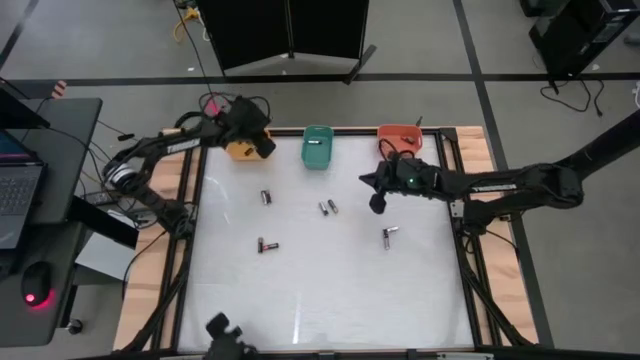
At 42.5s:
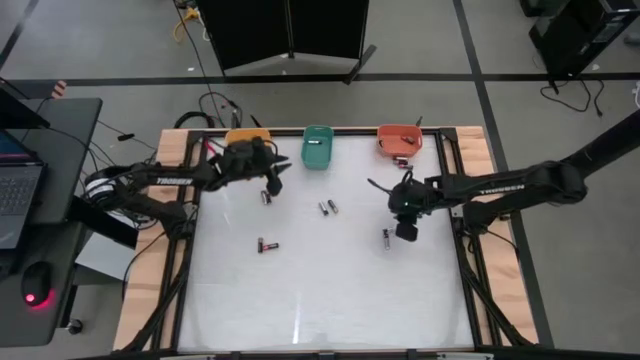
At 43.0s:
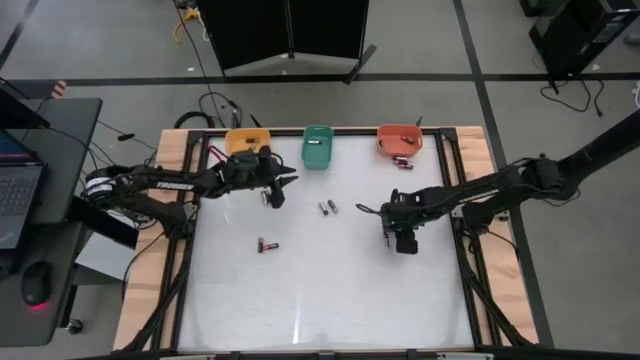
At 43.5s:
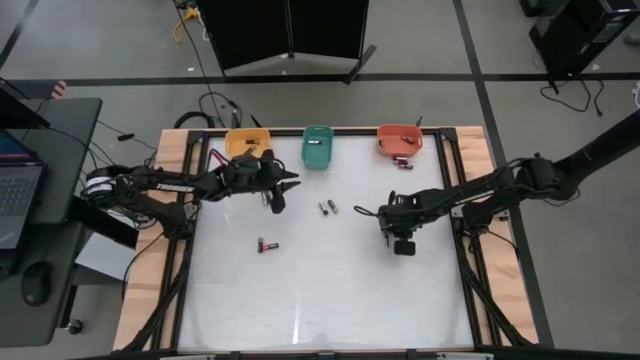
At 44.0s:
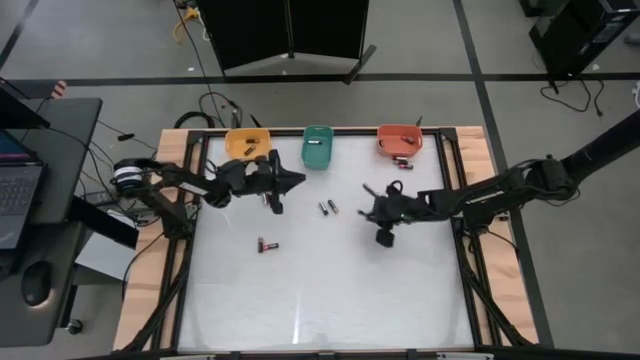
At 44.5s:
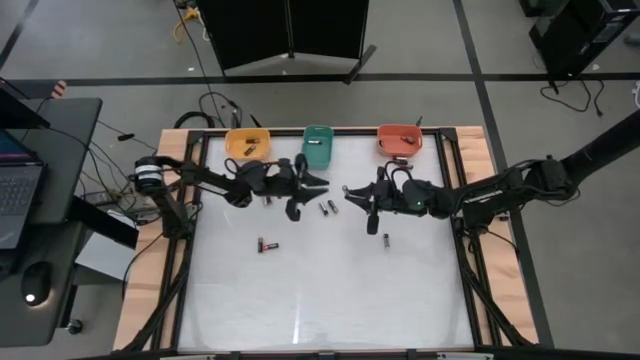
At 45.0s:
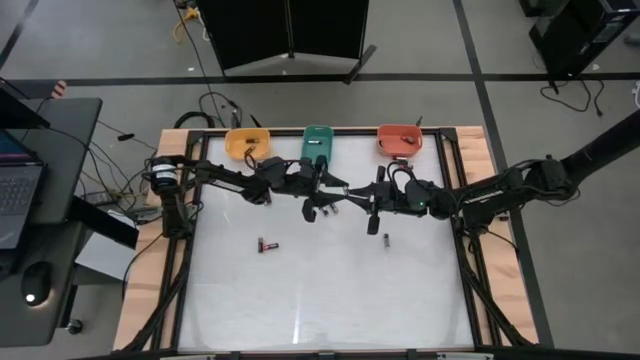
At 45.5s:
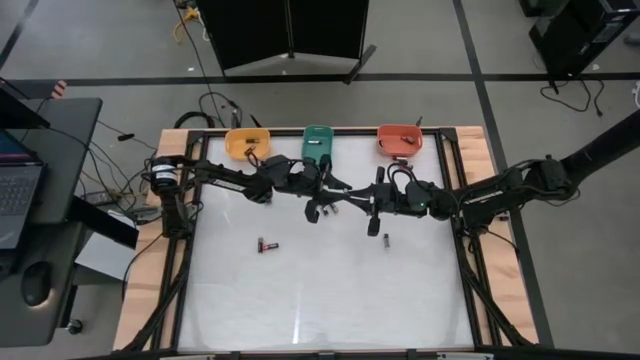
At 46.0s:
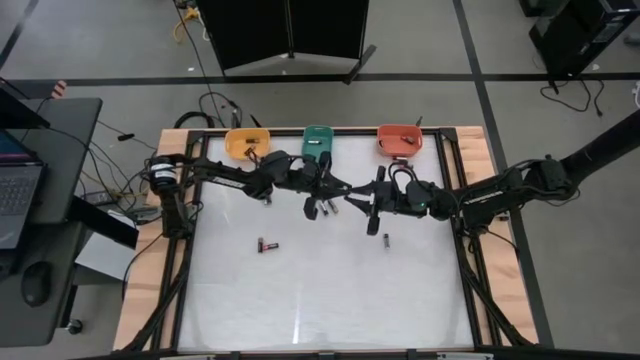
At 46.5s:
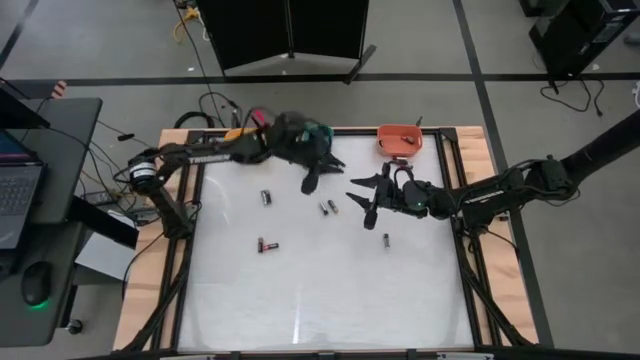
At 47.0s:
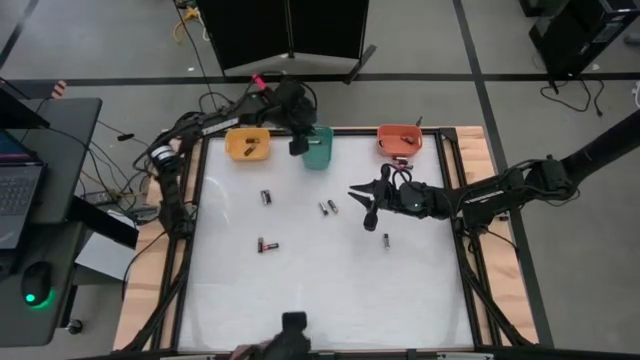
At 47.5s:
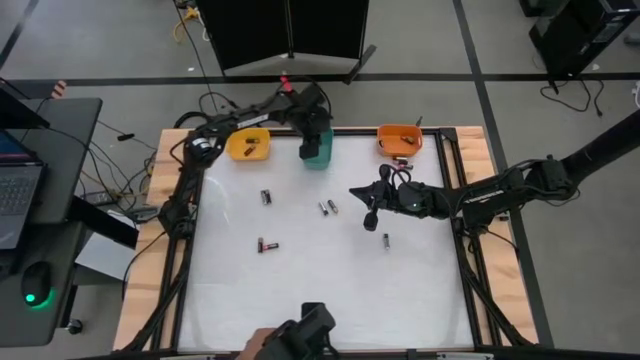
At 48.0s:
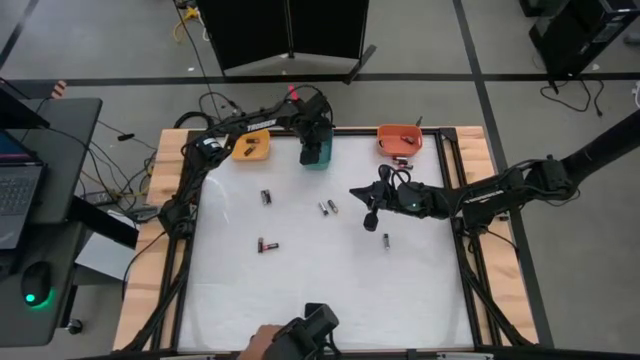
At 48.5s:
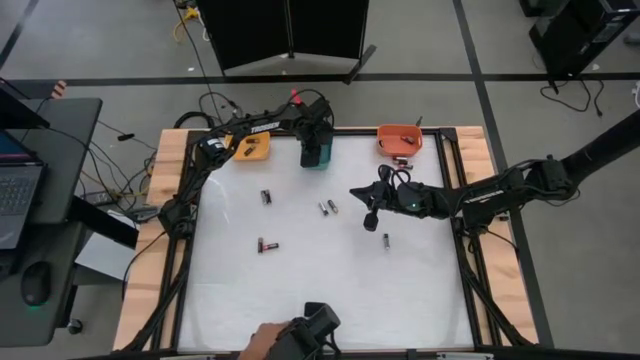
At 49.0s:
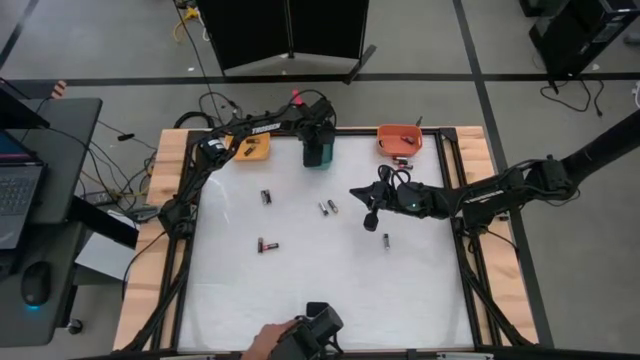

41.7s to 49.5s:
Task: Sort batteries
Put the silver battery into the green bin

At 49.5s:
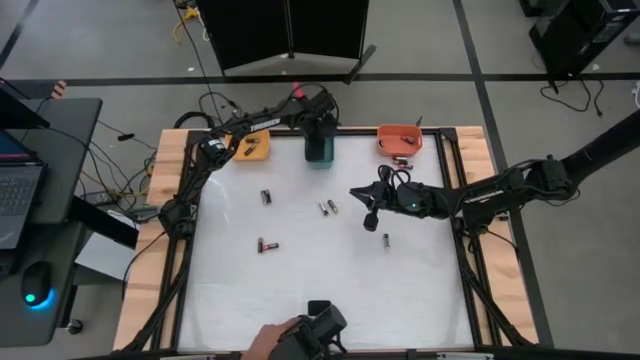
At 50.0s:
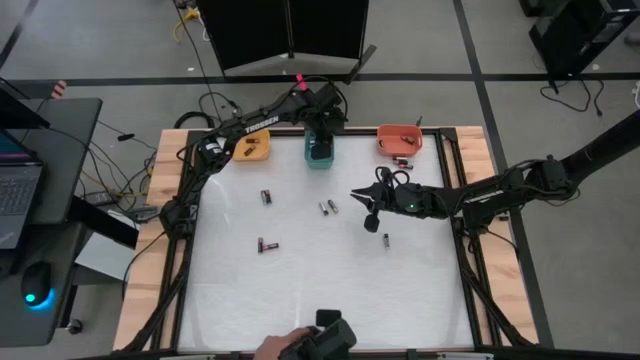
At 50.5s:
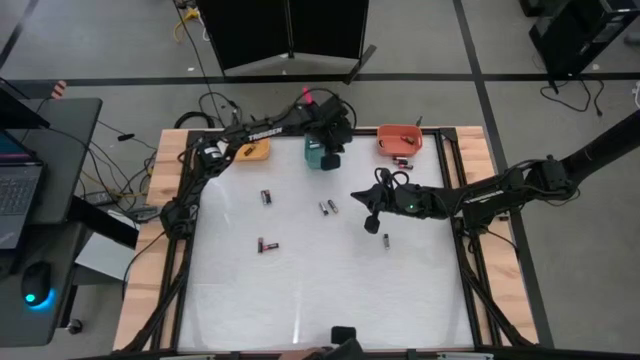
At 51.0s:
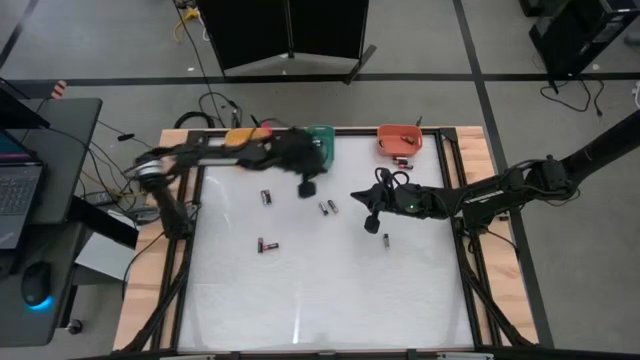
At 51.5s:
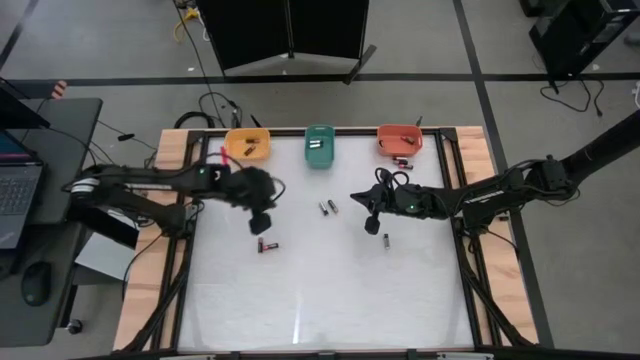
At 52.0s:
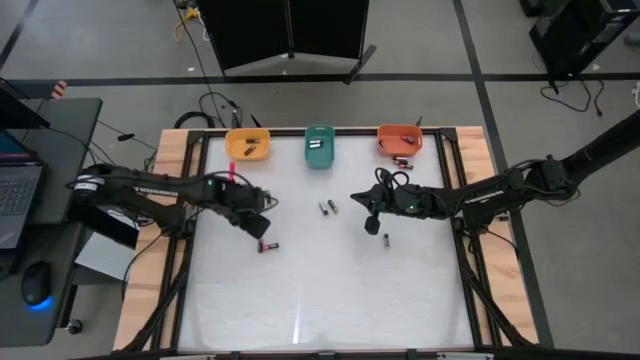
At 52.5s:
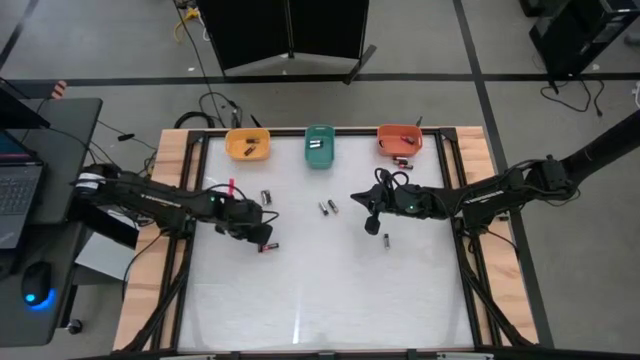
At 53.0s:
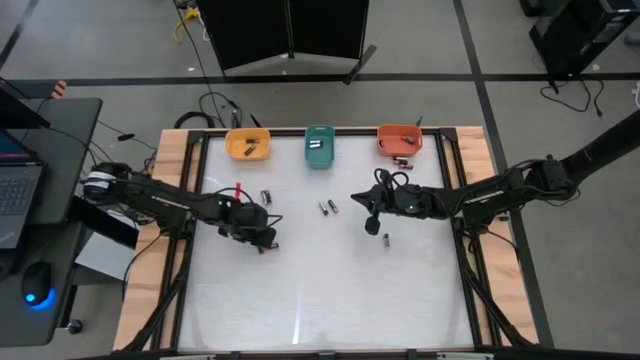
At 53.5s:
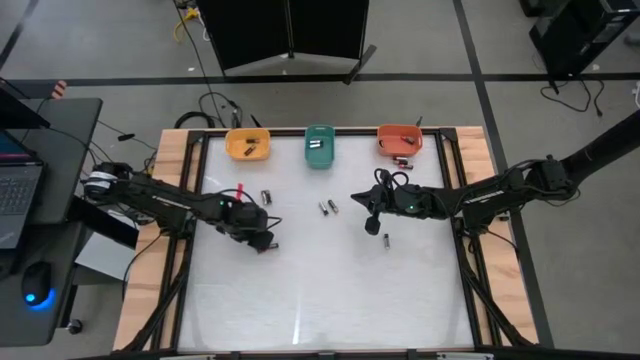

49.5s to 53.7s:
Put the black battery into the yellow bin

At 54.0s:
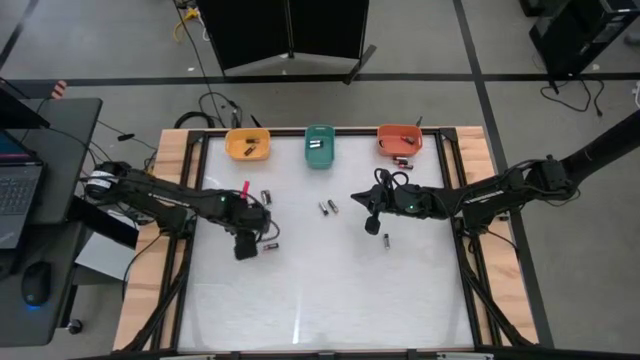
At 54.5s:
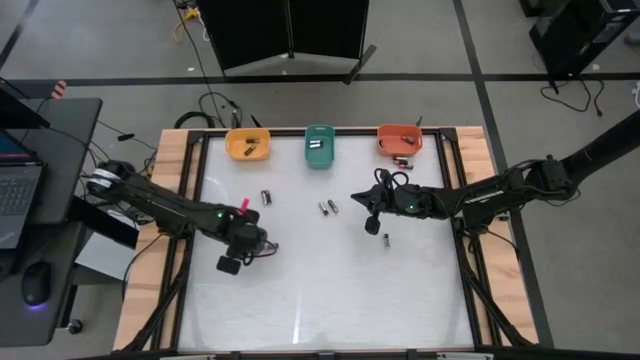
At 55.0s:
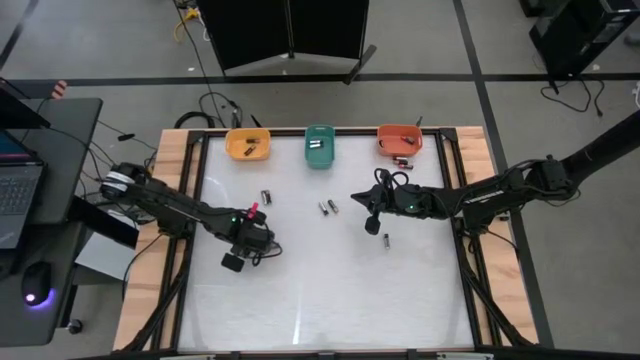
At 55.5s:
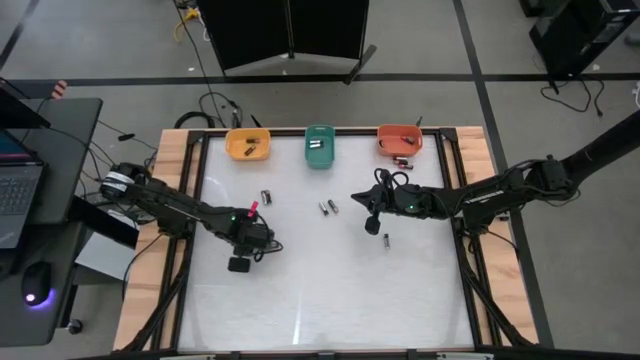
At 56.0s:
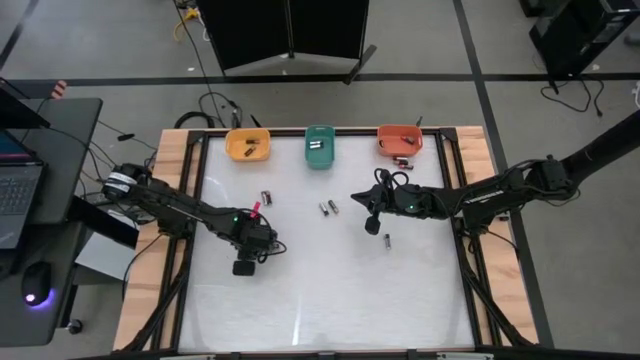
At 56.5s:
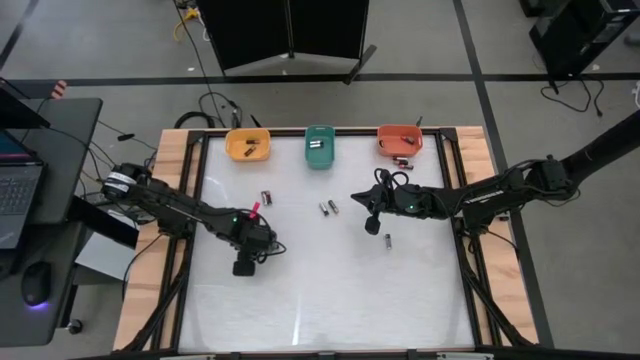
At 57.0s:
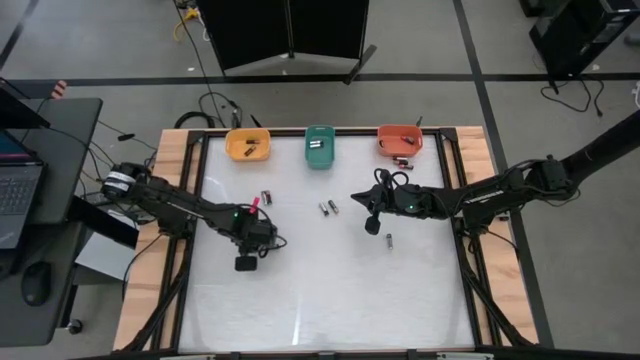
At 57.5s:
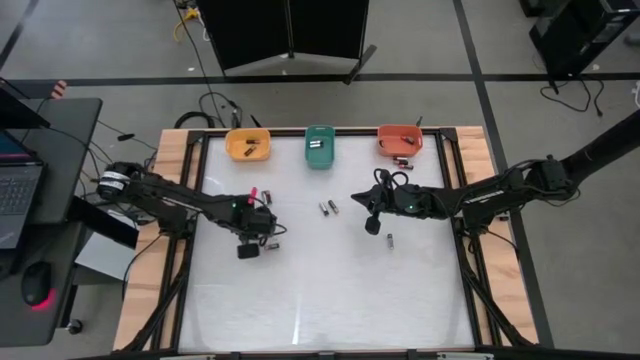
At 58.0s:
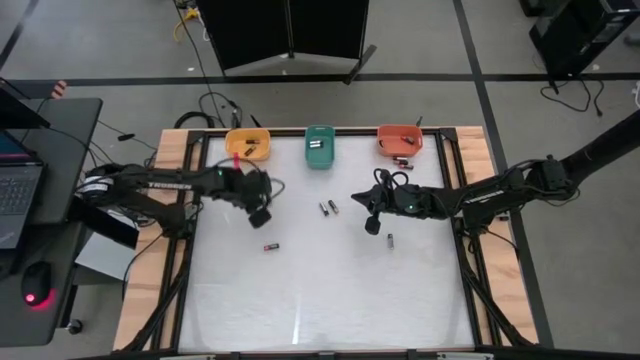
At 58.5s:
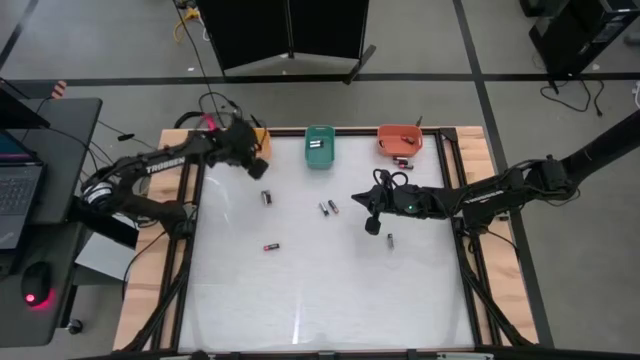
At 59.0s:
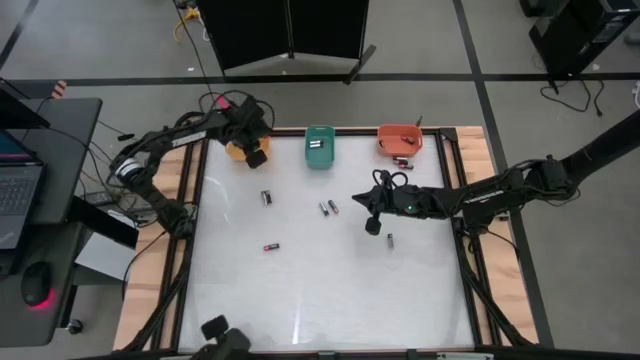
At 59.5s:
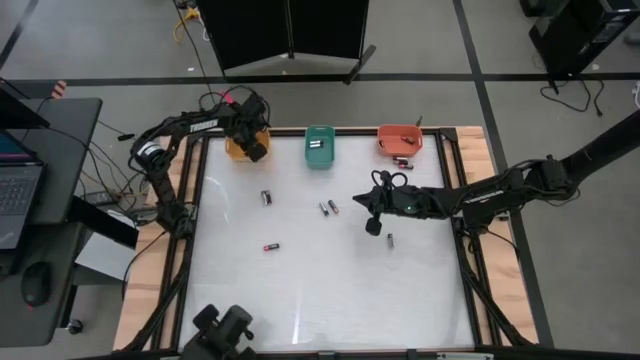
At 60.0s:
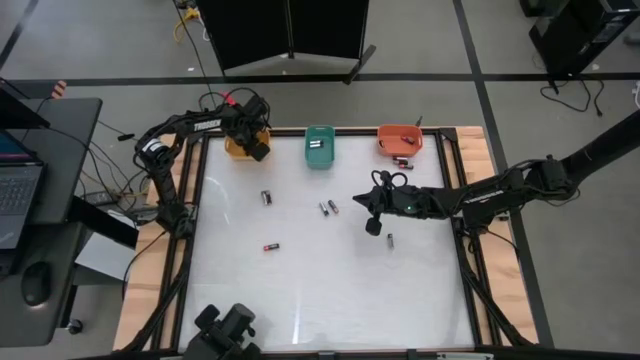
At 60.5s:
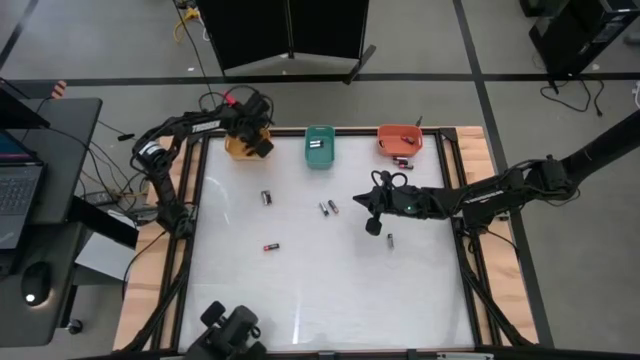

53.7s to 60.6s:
Put the black battery into the yellow bin

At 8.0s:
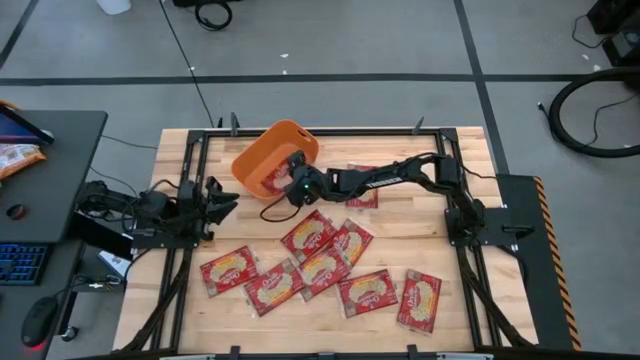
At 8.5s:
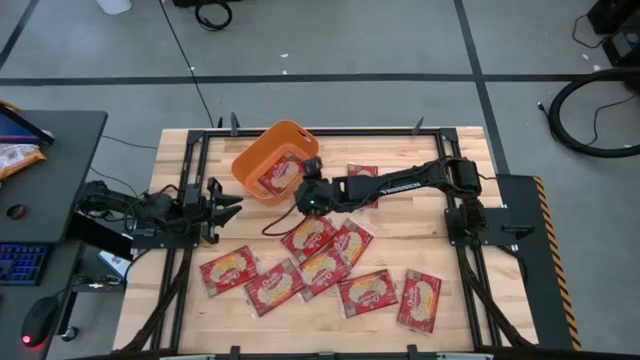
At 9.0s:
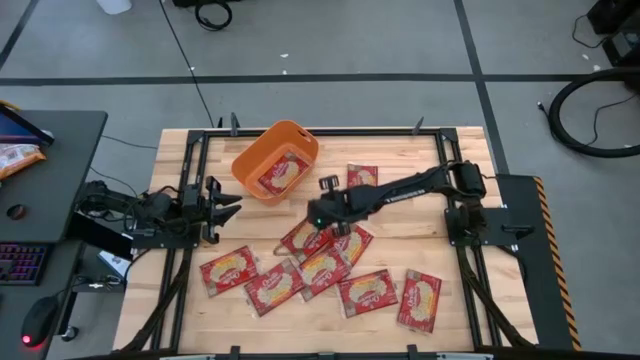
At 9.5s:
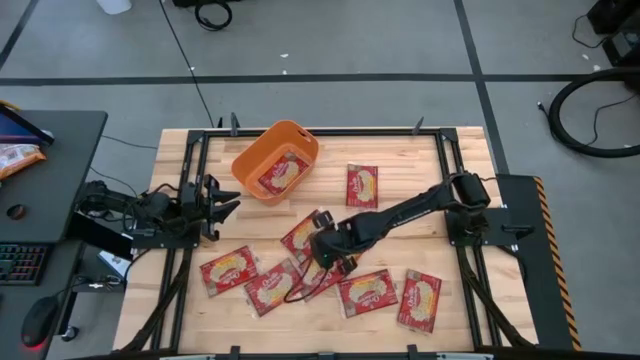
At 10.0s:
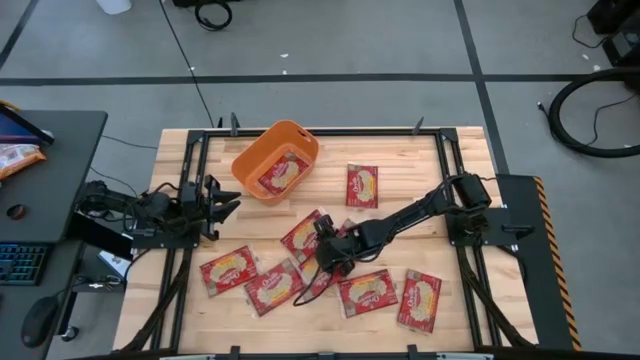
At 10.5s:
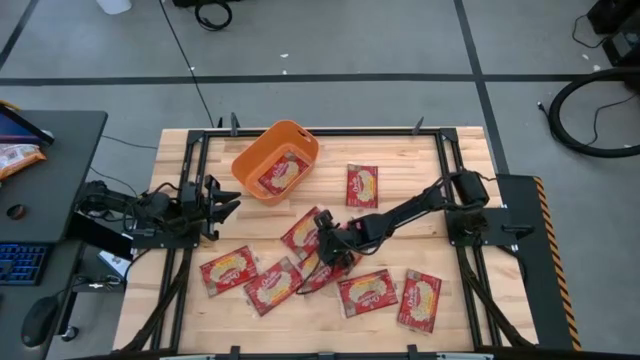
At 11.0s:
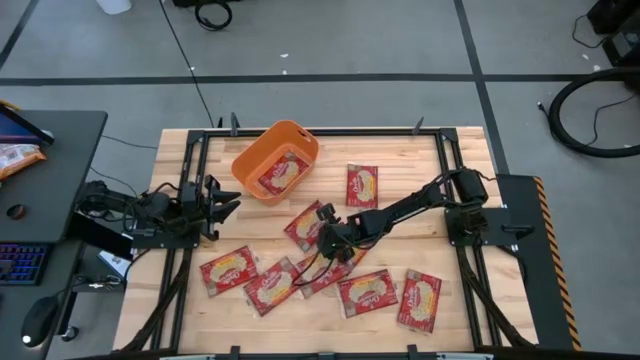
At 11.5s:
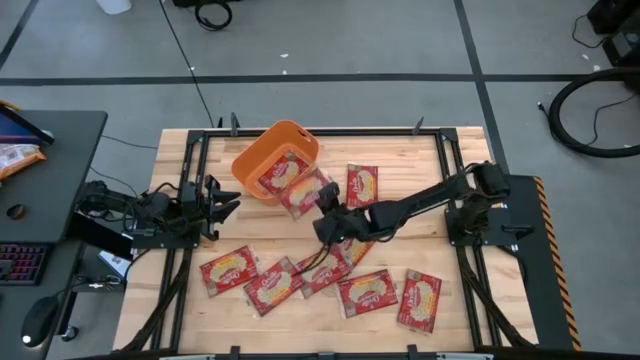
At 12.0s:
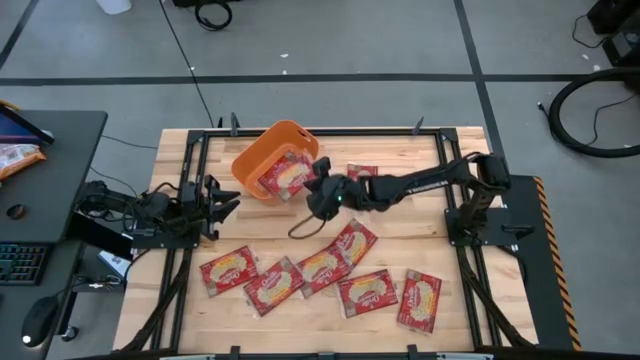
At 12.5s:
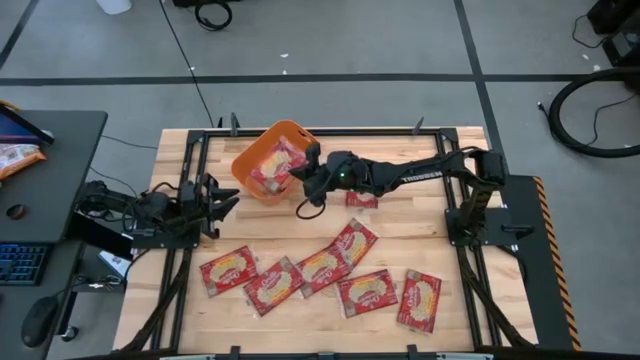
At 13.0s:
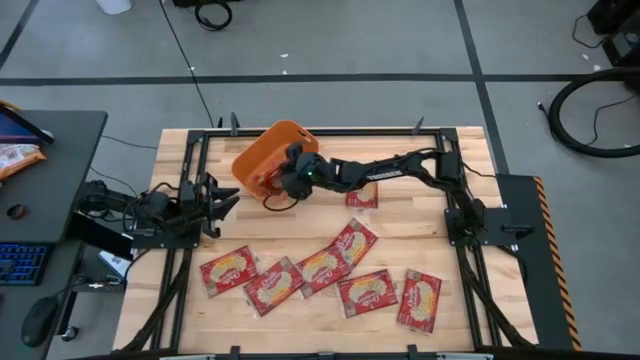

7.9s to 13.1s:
Task: Sort popcorn bags into baskets
Put the red popcorn bag into the orange bin
